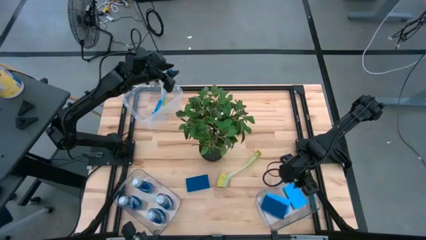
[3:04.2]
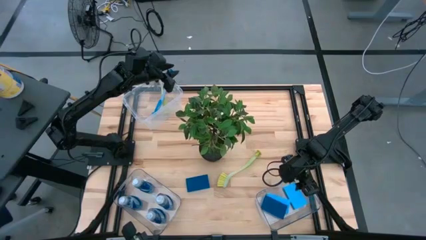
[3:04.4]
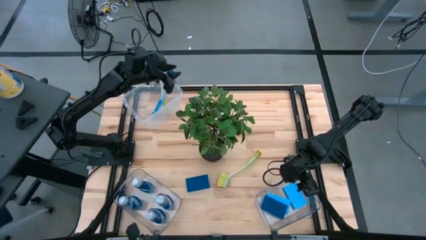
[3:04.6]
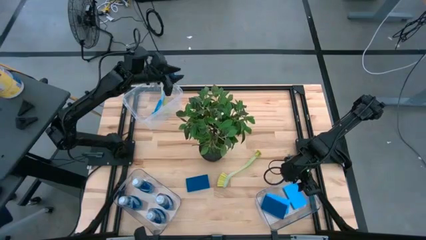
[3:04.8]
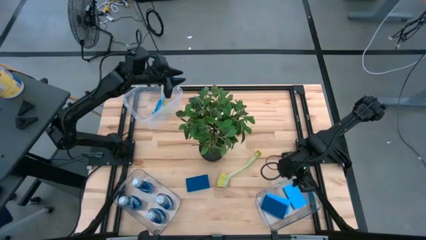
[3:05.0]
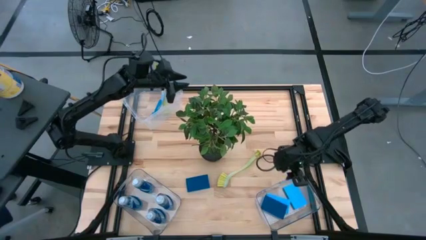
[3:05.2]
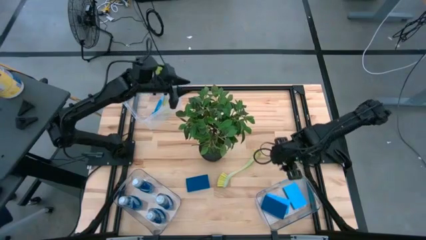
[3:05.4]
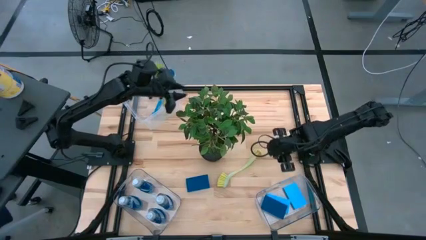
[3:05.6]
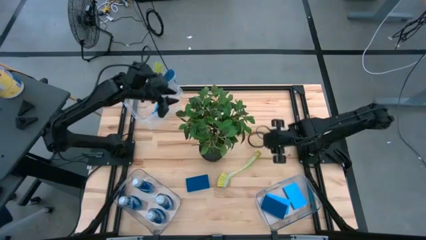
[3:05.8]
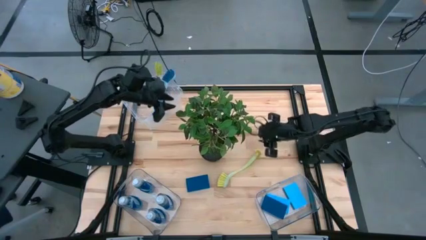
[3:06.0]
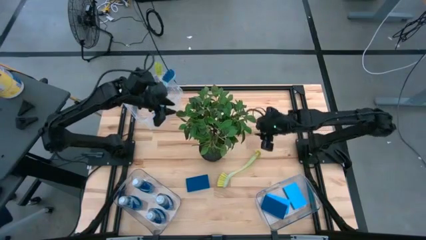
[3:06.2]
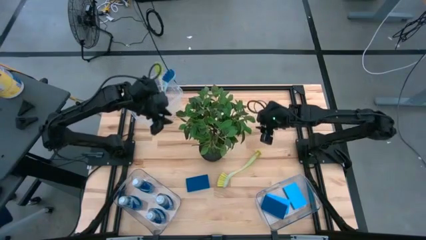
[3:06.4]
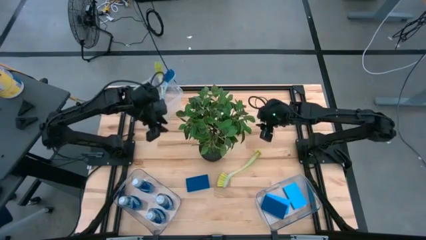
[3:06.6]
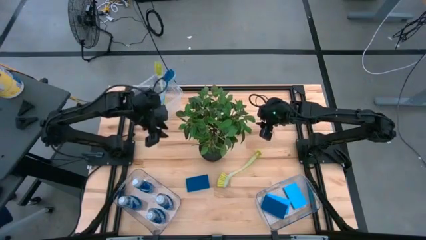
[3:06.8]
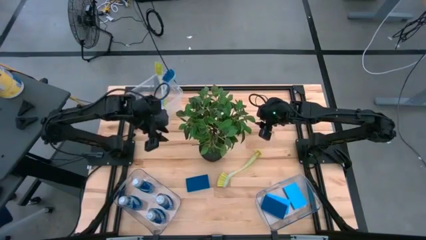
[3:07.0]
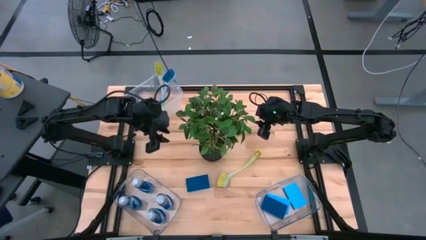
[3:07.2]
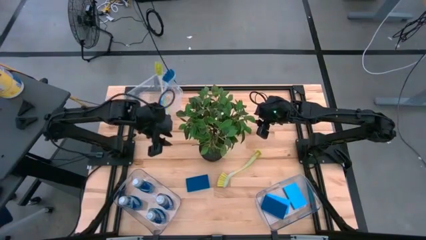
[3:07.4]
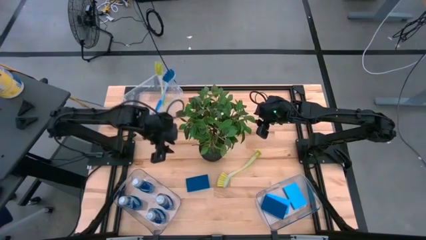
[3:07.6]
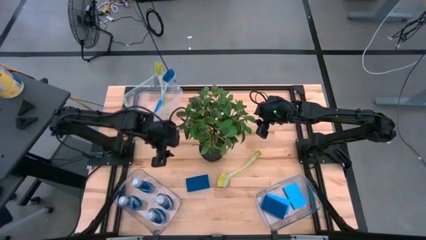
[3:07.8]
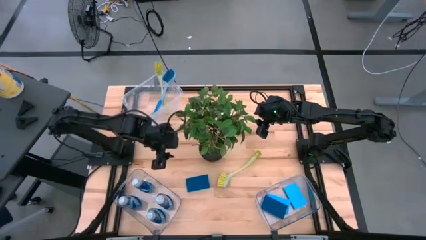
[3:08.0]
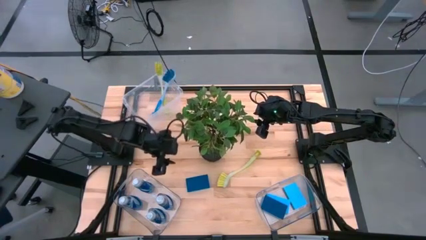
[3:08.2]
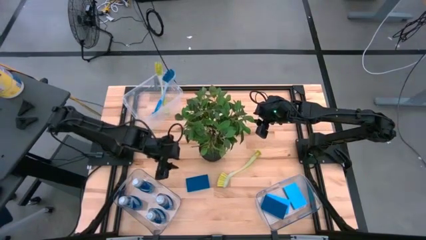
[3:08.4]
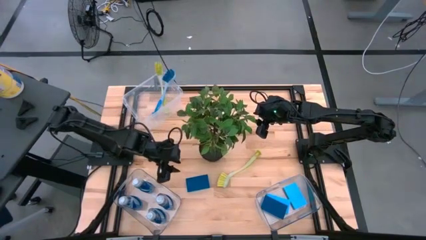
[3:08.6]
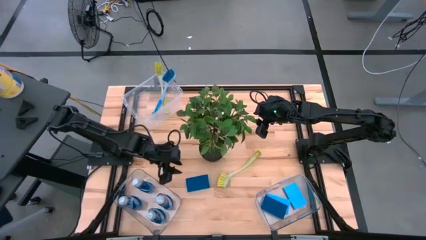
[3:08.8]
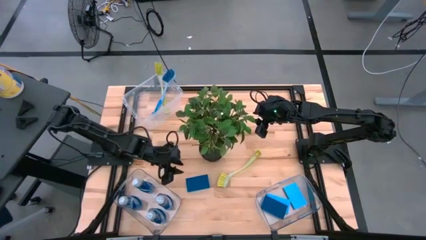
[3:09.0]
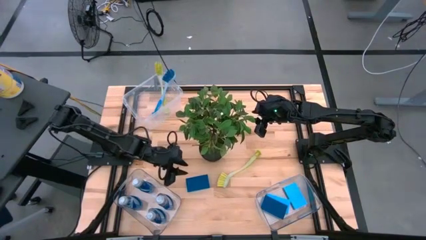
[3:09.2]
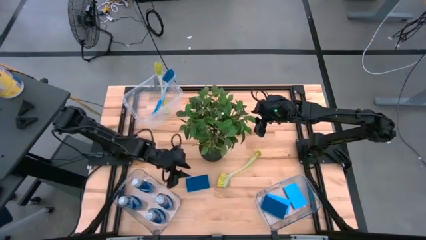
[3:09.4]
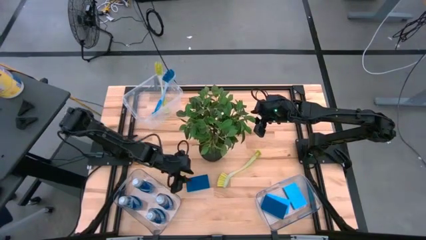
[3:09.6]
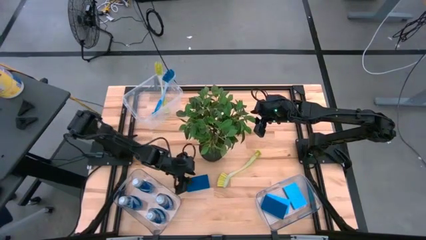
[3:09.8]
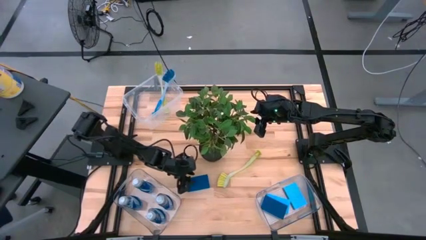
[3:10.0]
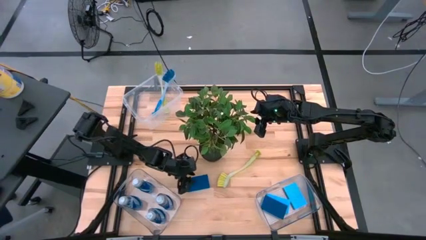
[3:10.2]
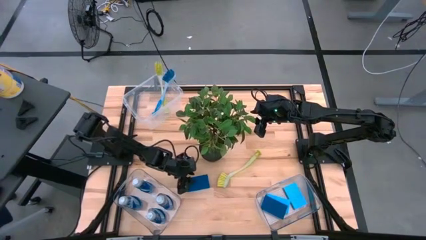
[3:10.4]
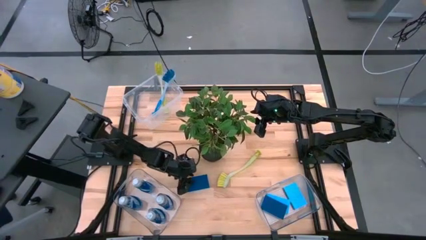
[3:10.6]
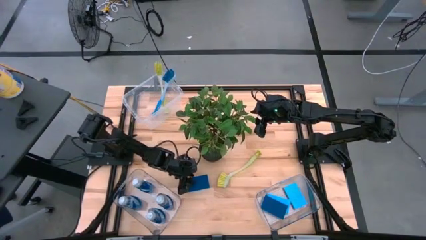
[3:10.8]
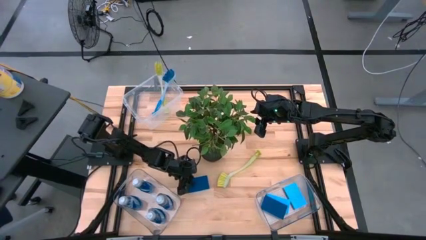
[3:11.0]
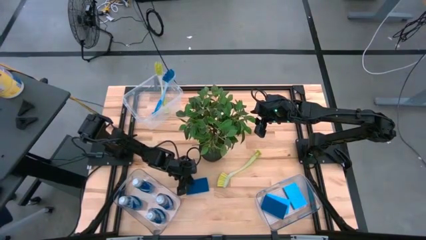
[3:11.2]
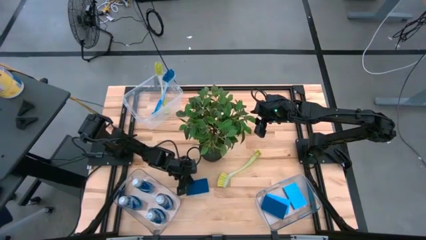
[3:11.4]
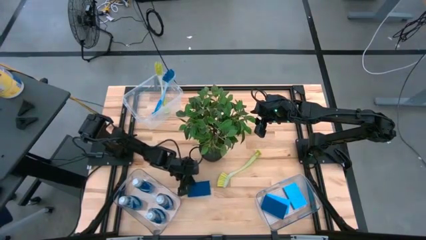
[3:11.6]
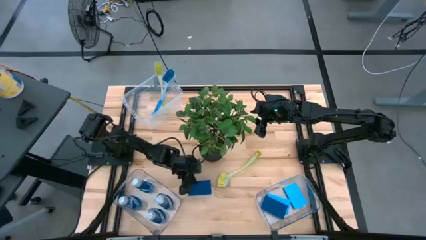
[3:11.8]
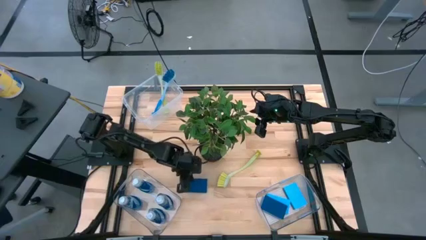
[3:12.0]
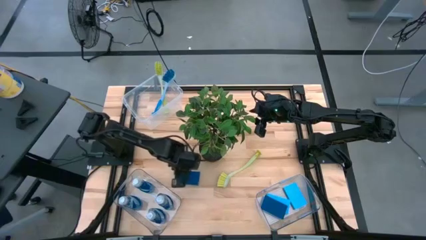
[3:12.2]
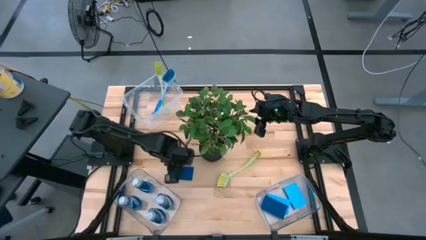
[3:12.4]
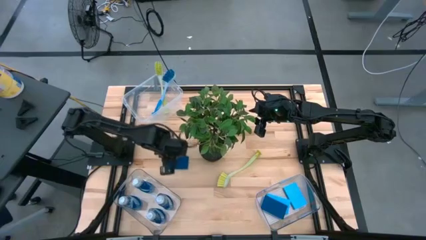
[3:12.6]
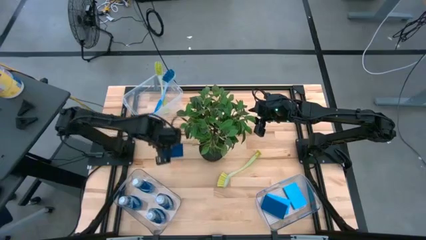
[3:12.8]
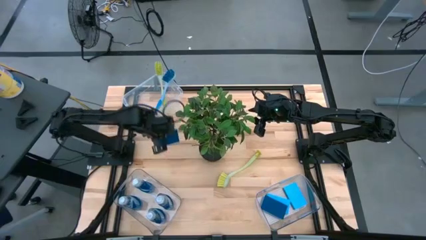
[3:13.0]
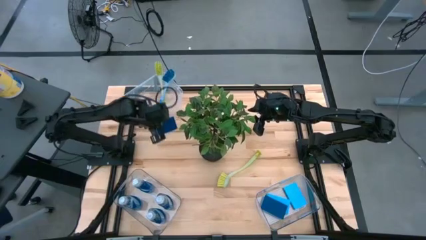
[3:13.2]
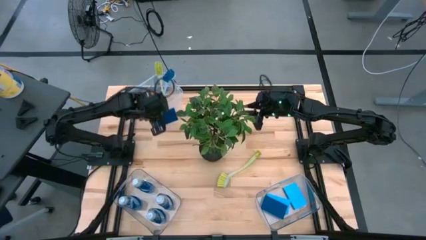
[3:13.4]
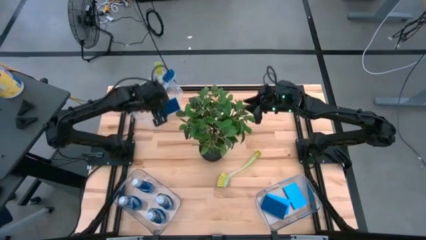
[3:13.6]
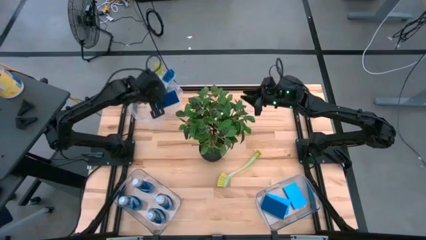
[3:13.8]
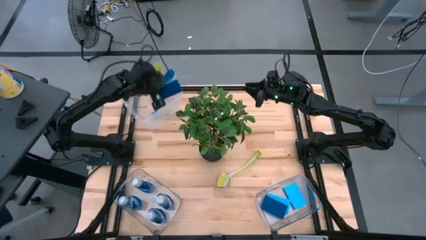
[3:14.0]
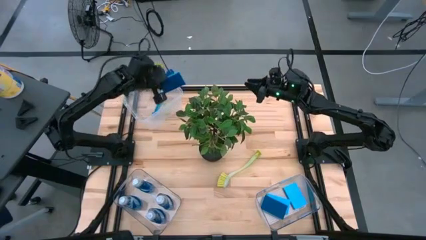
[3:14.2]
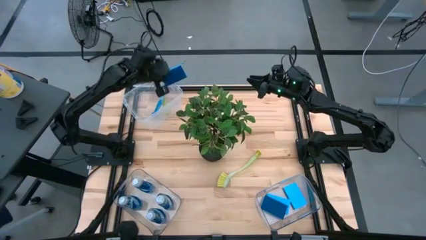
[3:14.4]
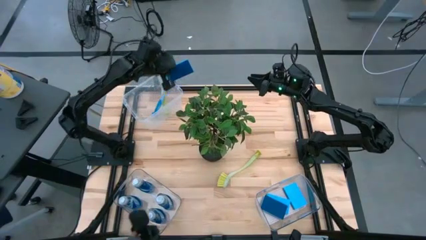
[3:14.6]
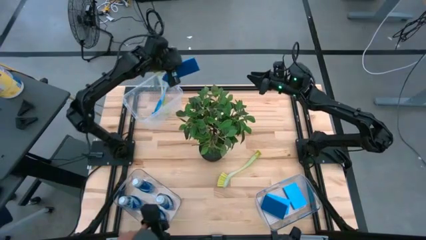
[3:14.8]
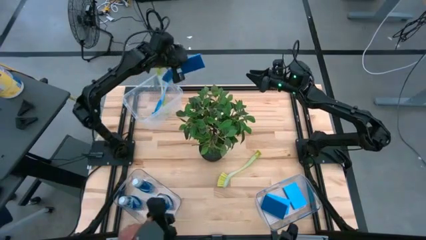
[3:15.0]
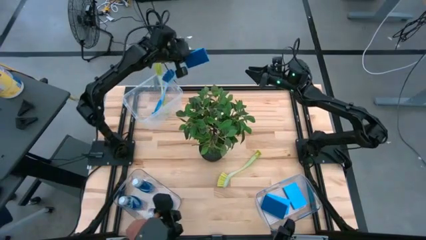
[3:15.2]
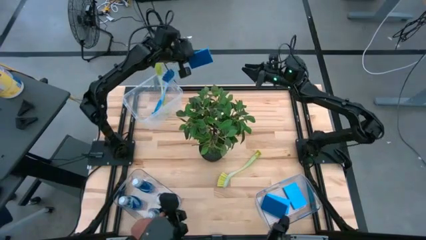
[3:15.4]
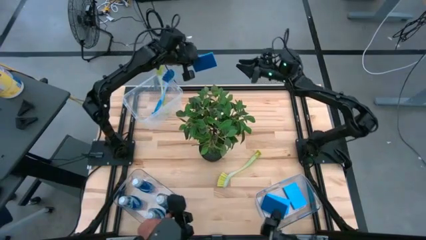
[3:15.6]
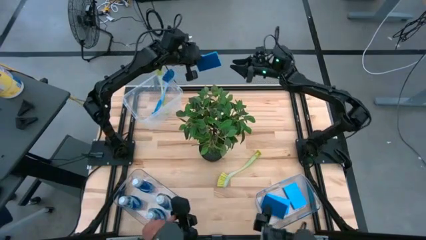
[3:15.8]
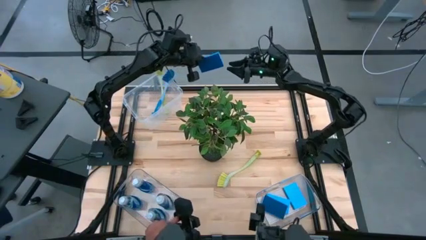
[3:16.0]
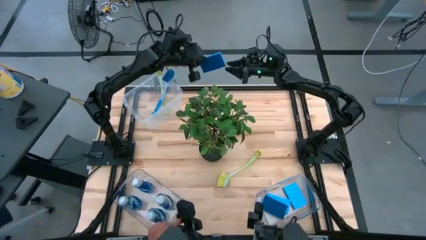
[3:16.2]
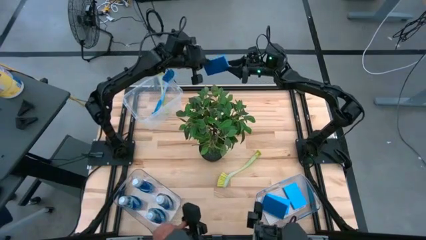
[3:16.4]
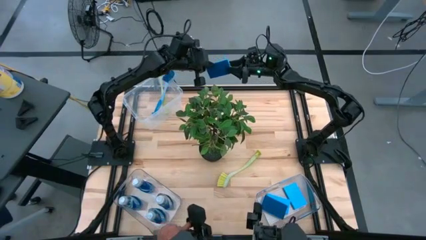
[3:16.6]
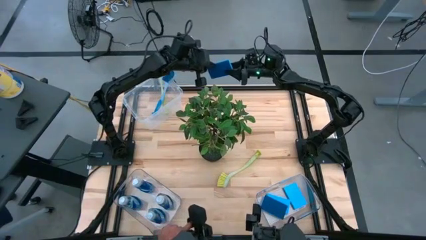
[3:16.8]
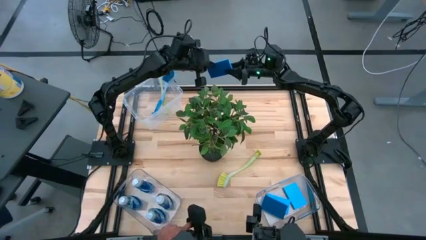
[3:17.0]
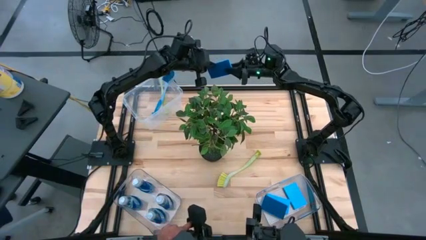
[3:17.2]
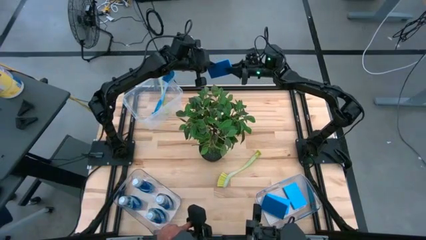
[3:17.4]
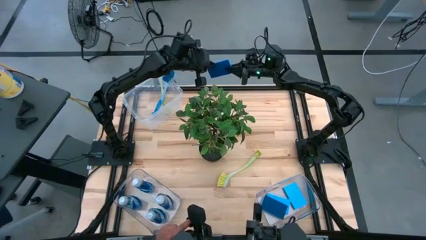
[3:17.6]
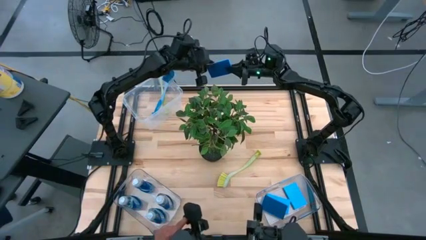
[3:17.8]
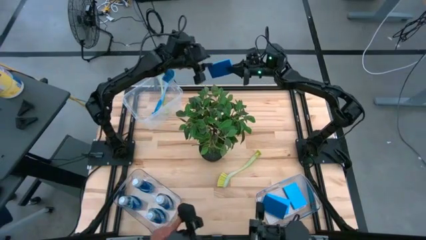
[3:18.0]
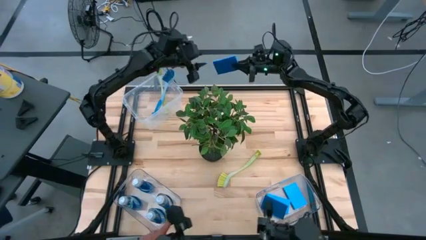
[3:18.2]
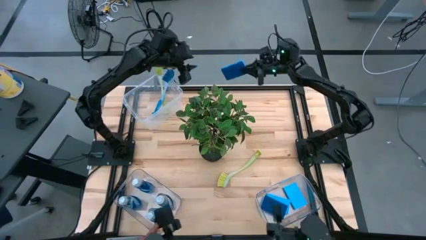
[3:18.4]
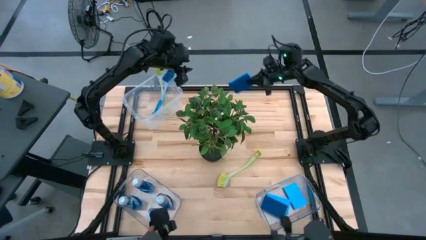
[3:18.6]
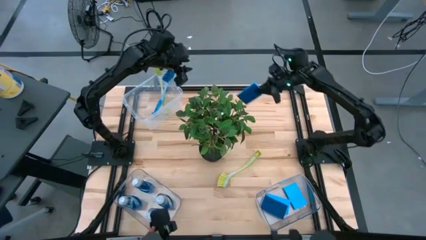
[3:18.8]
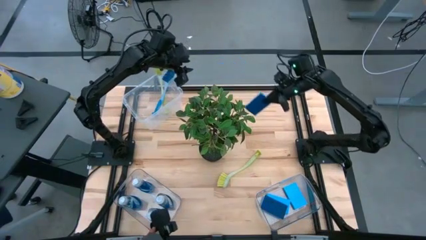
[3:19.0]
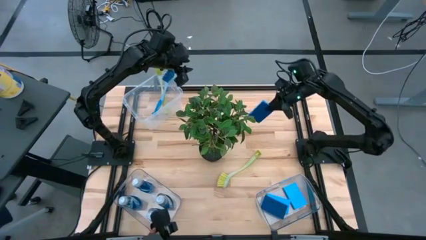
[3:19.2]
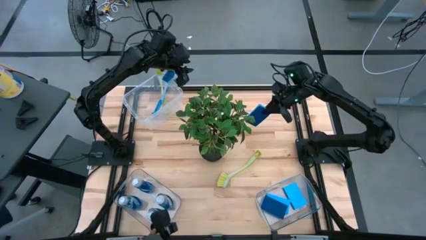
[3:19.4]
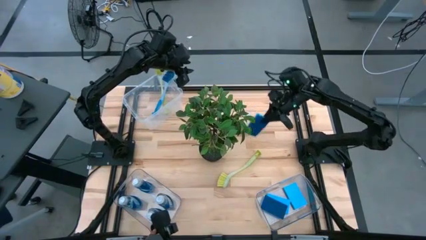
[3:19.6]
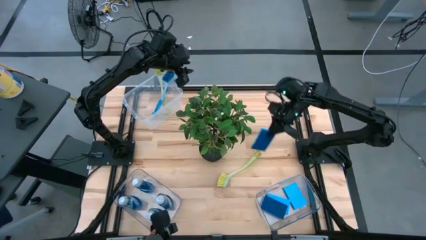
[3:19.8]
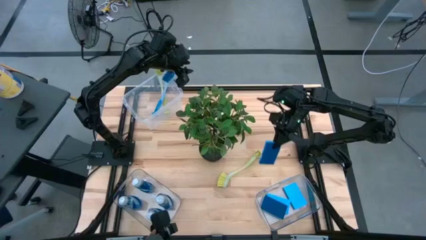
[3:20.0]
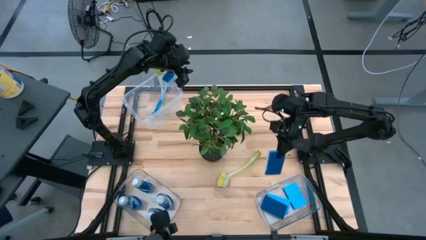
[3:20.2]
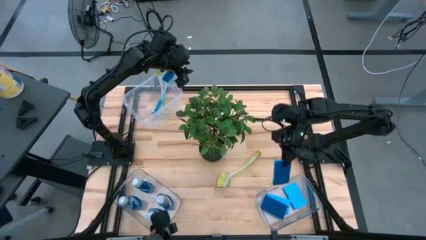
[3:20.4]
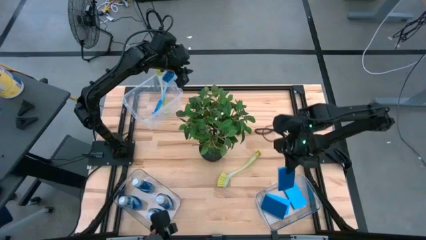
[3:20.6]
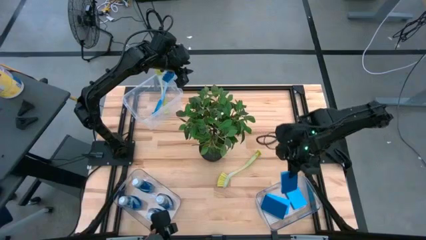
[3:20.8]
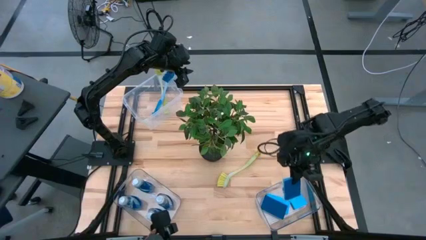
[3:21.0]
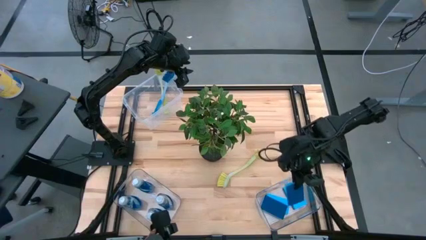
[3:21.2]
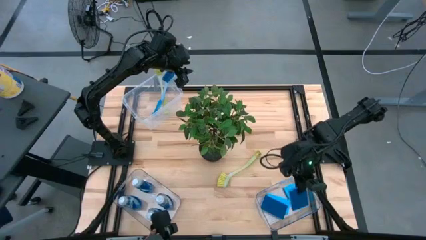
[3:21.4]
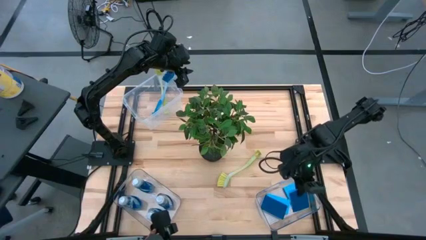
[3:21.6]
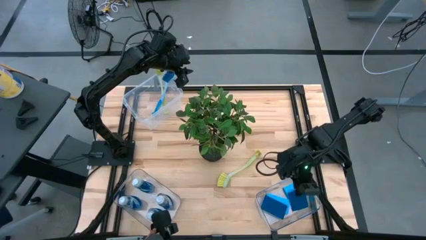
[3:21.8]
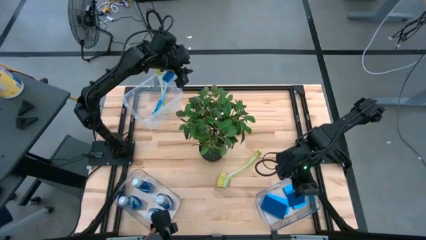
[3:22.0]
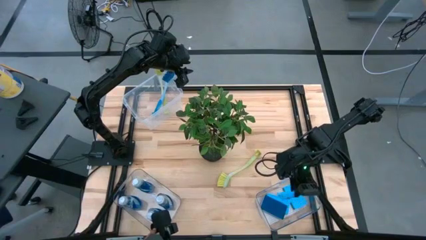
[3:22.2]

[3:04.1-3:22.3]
Task: Pick & Place Kitchen Sink Supplies
Put the blue sponge into the bottom right transparent bin
